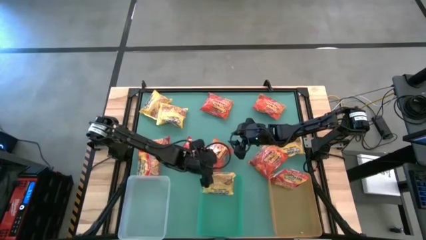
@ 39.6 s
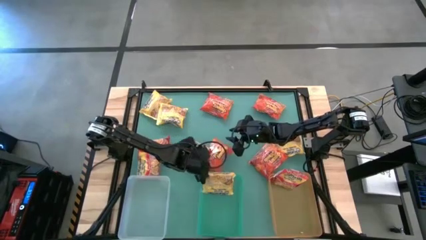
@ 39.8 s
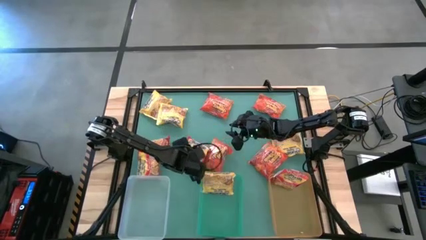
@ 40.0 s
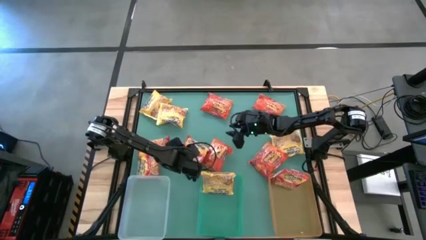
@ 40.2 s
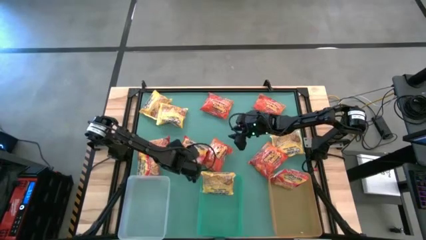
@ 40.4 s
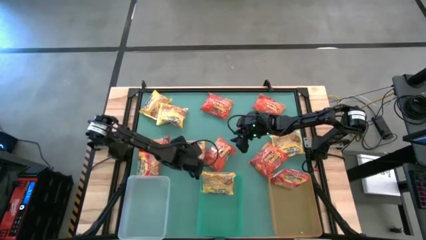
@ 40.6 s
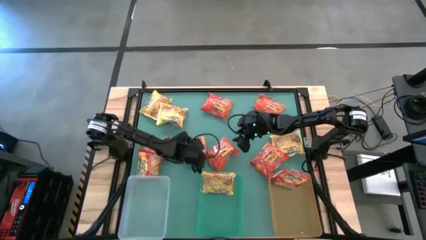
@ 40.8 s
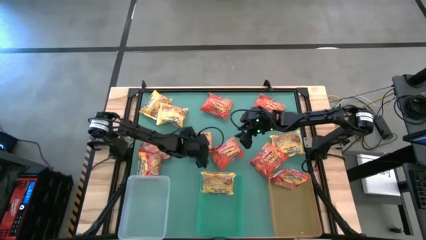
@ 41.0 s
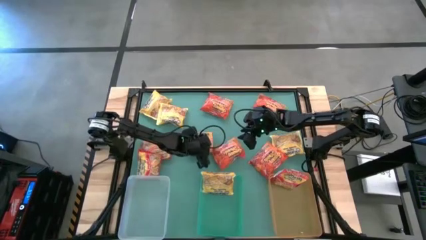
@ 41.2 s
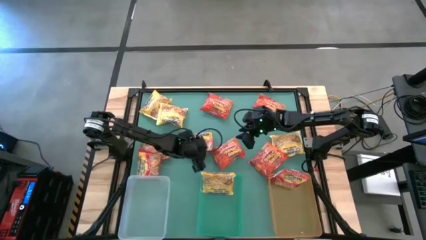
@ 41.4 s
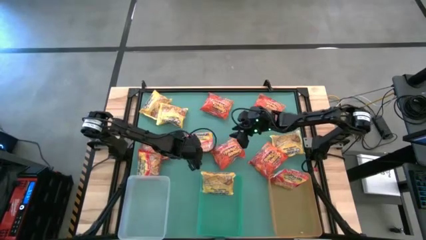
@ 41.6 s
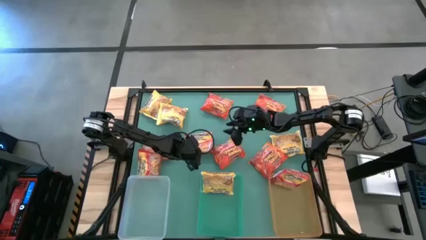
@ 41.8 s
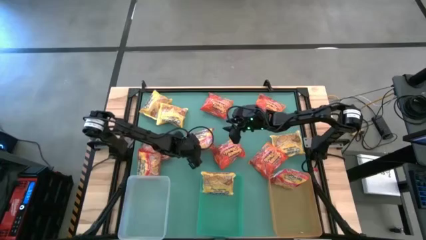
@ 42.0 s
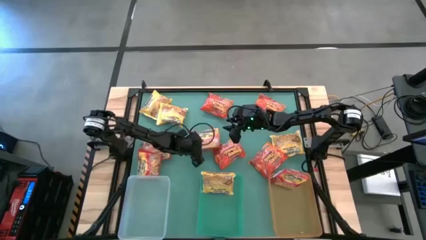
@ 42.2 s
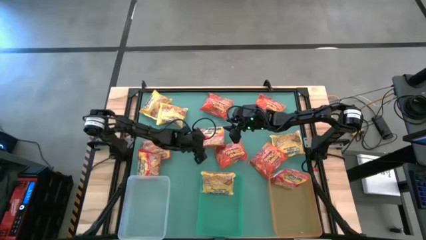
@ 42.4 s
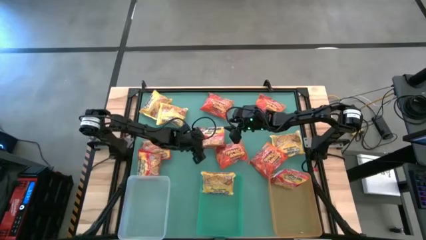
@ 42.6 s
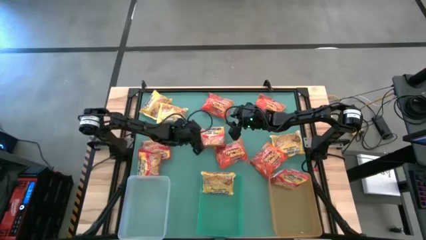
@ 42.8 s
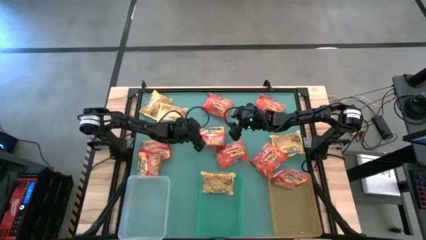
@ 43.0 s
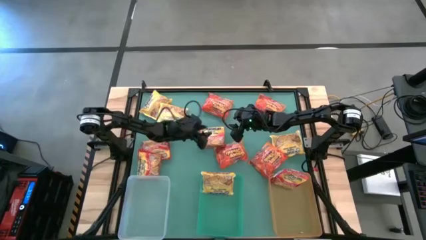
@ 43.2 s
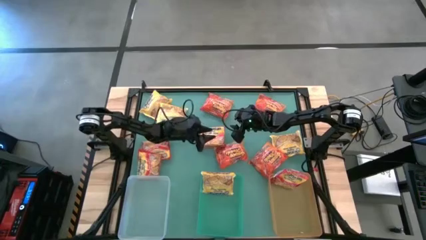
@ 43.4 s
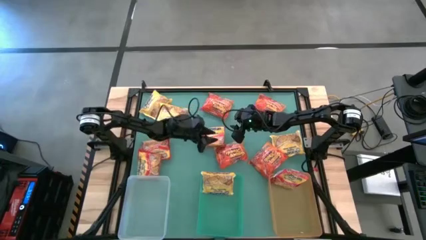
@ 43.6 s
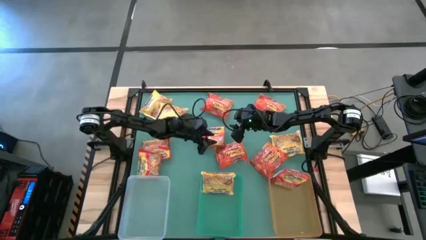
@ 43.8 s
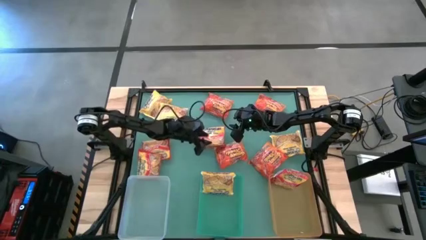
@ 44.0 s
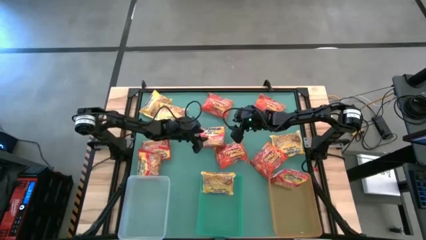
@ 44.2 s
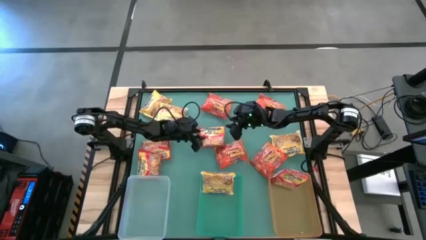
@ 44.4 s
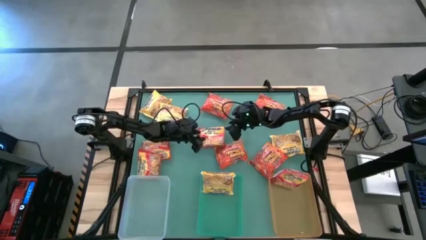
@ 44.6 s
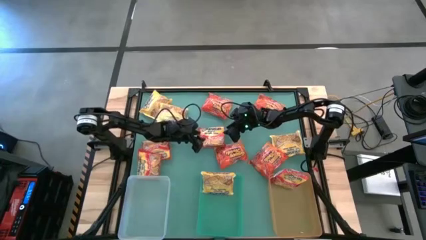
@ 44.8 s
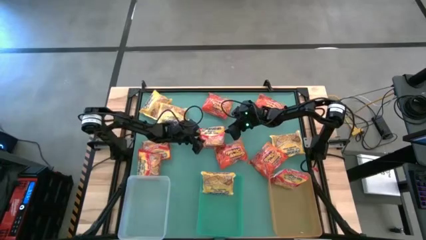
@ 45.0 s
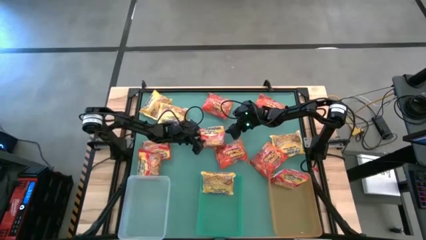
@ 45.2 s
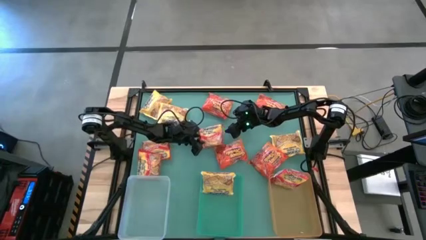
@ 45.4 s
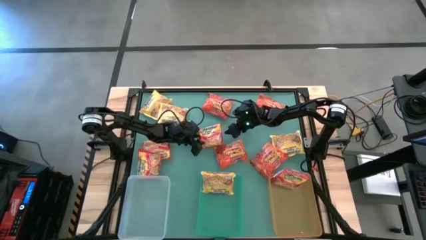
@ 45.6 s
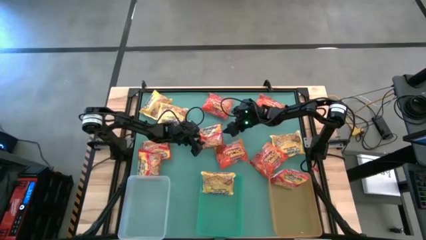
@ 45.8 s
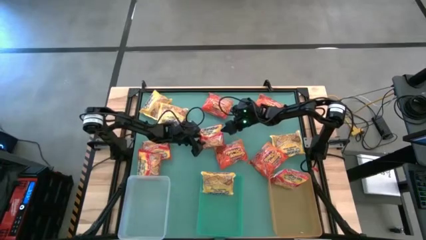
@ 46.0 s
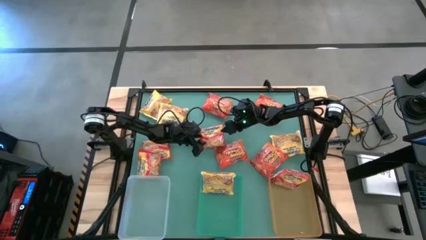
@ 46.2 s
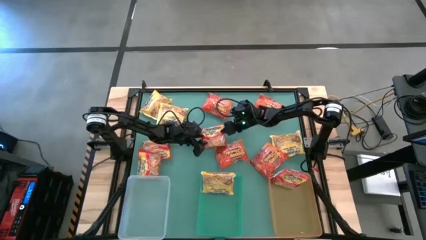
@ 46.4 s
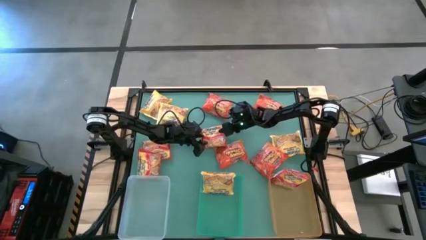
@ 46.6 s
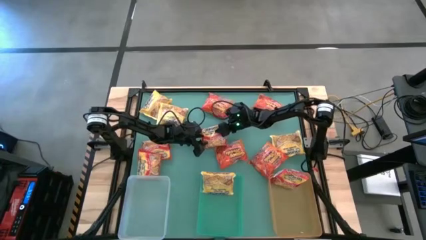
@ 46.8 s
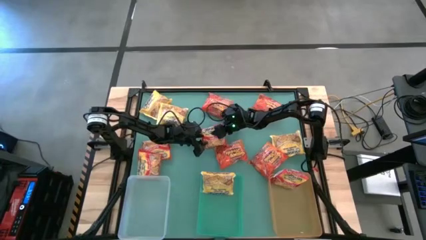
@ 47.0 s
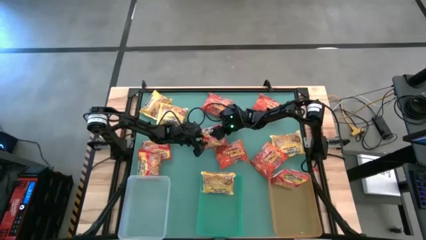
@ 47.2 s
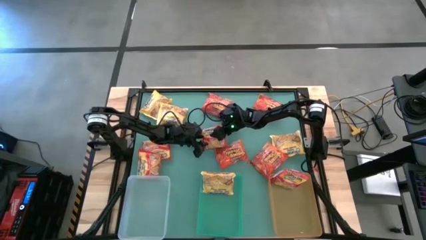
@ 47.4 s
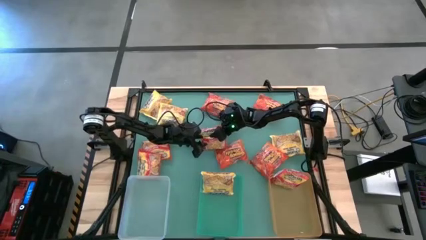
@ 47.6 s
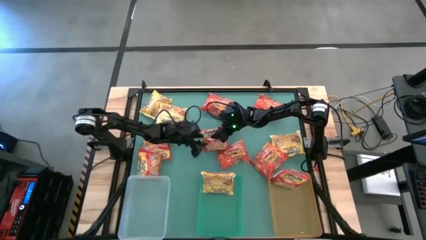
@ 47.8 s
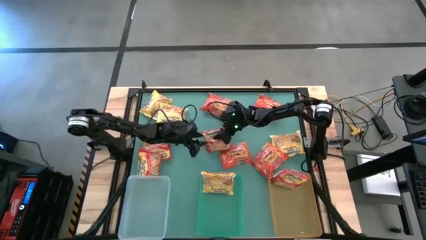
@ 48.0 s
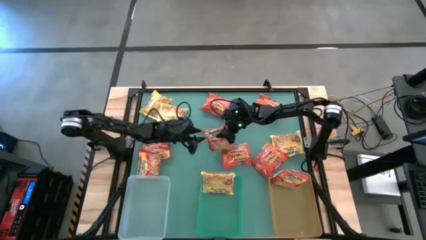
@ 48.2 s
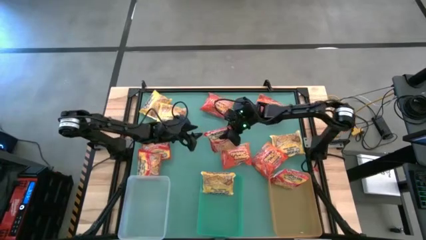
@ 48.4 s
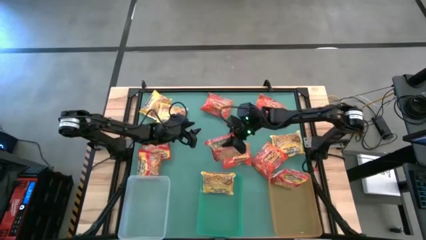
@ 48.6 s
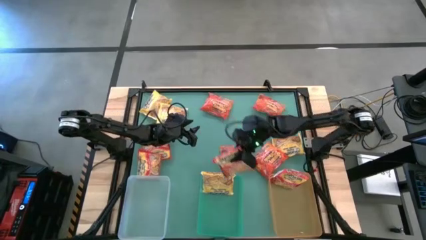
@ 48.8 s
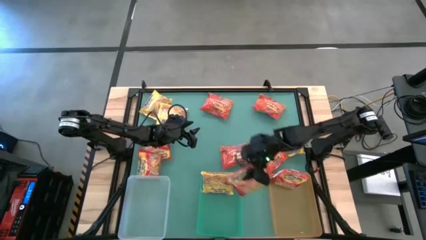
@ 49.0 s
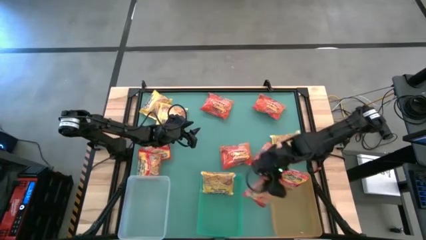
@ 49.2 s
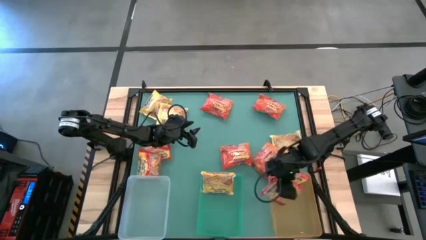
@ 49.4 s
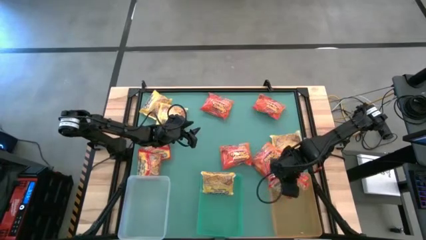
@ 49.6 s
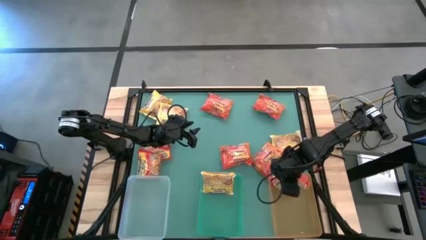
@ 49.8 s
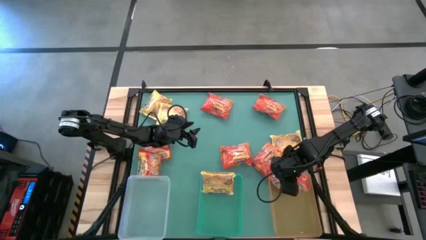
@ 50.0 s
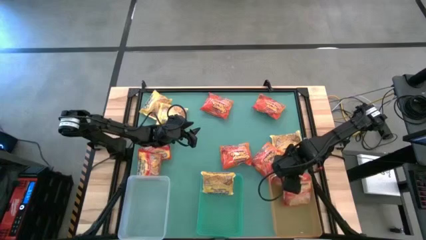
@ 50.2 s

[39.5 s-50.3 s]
Task: Sort Maruchan noodles
Put the red noodle pack into the orange bin
